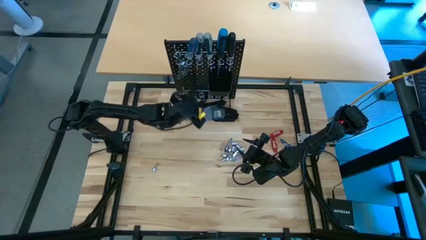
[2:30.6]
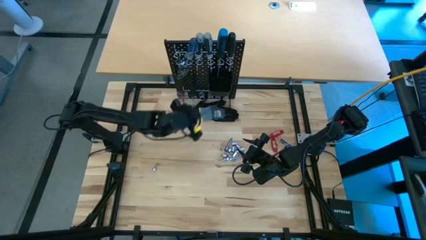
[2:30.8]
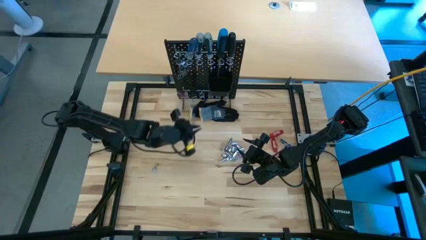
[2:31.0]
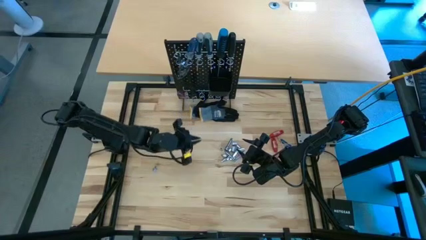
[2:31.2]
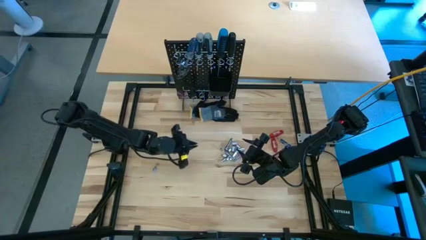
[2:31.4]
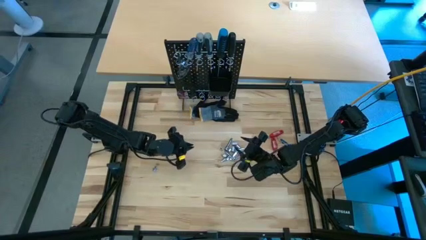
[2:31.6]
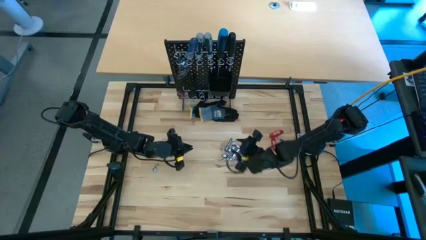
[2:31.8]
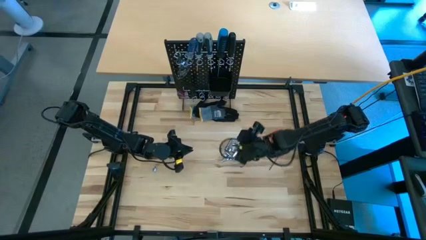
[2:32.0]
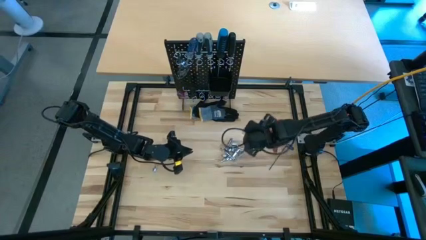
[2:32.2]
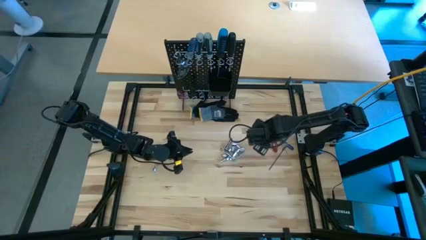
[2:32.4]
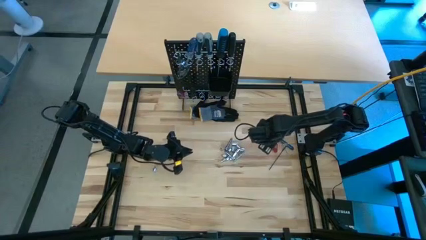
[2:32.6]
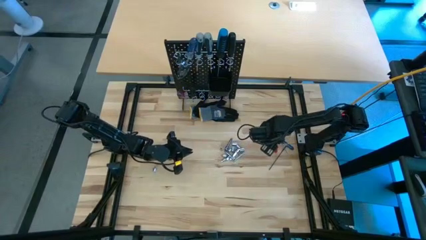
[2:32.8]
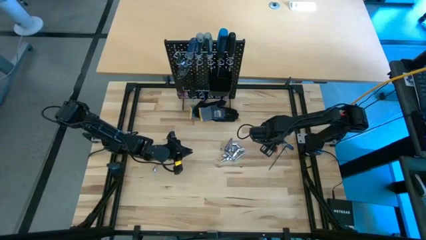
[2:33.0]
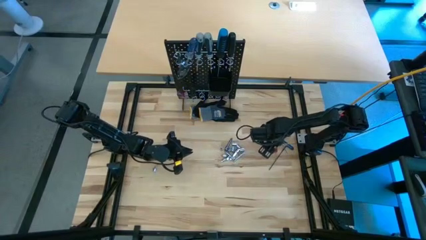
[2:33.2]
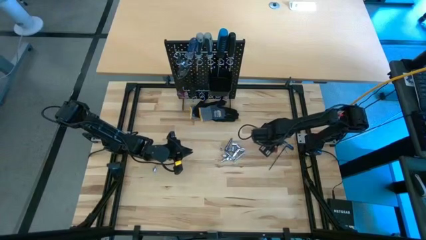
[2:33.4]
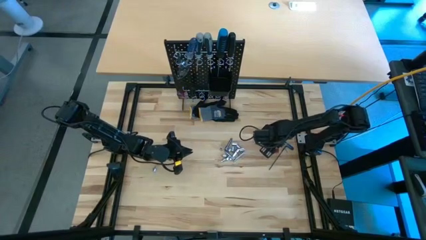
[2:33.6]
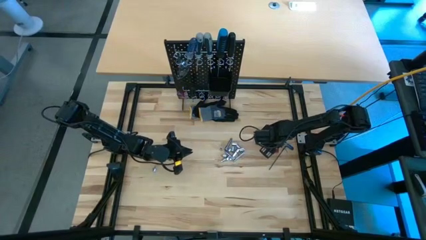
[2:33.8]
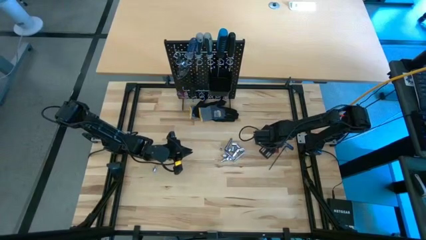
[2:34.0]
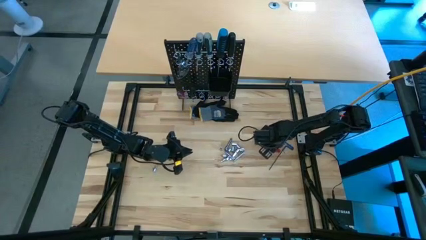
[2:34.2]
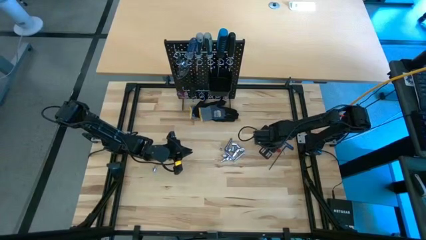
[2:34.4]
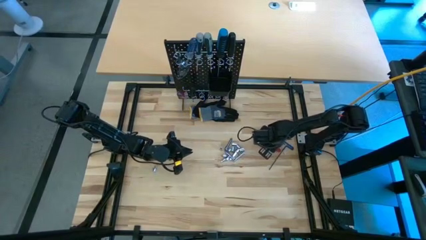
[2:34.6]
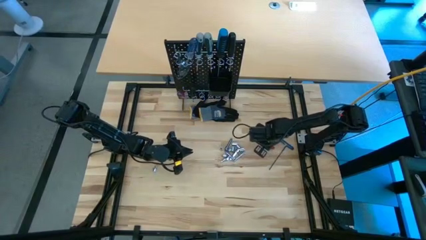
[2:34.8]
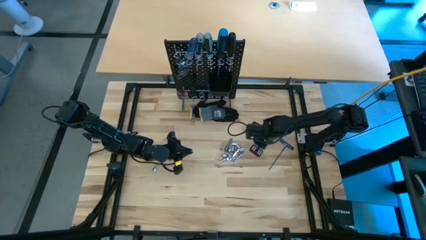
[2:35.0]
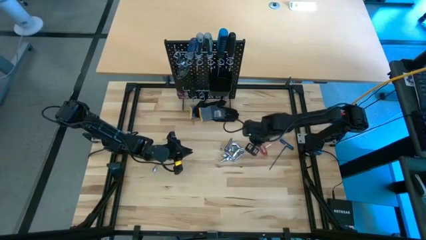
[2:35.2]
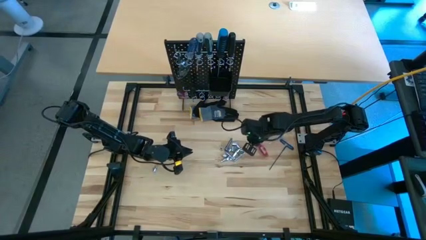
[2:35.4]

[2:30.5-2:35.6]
Task: Hang tools onto peg board
Hang the red allen wrench on the pegboard

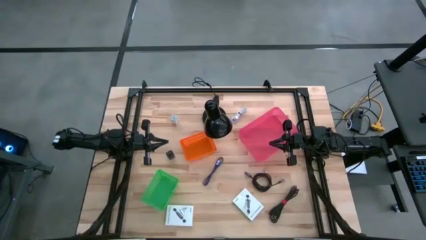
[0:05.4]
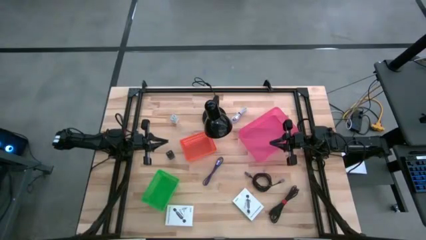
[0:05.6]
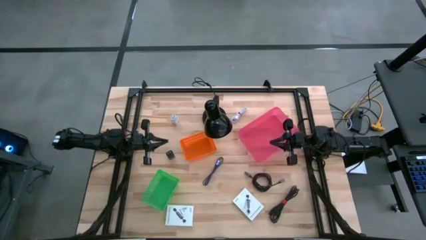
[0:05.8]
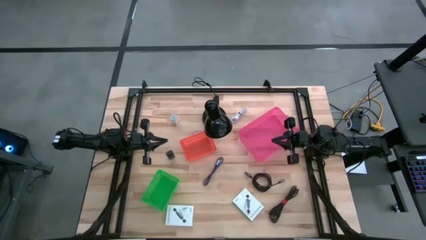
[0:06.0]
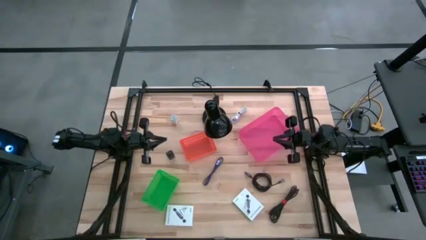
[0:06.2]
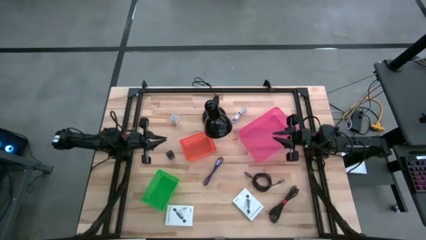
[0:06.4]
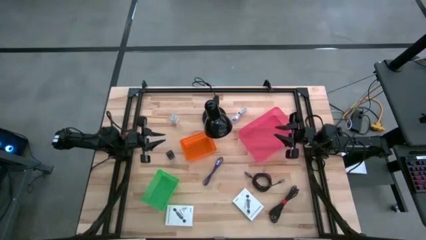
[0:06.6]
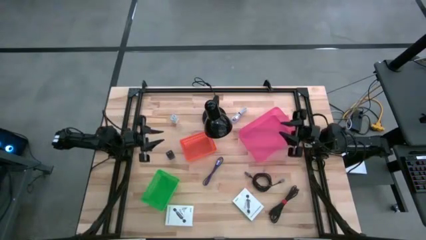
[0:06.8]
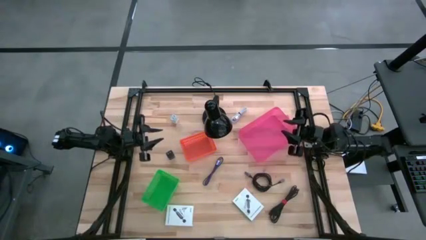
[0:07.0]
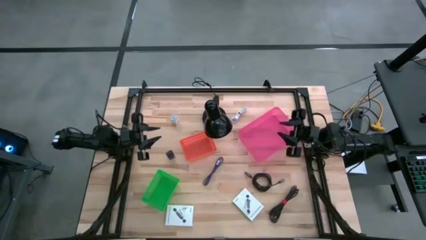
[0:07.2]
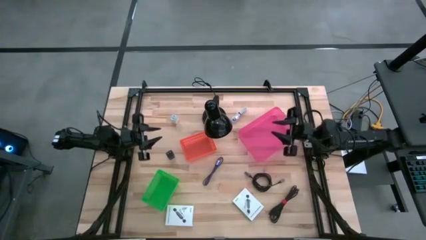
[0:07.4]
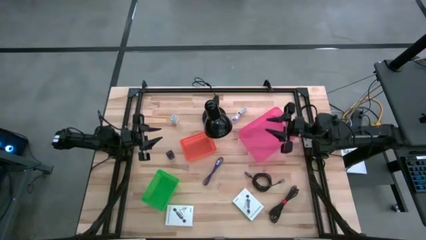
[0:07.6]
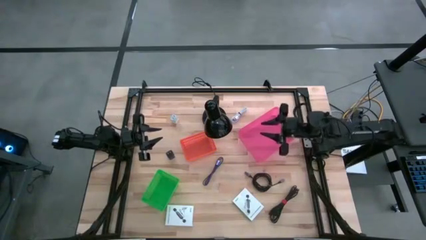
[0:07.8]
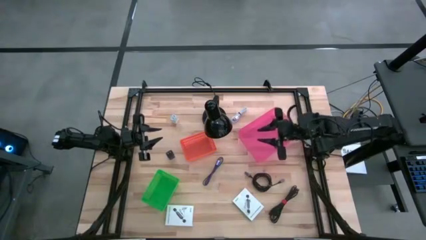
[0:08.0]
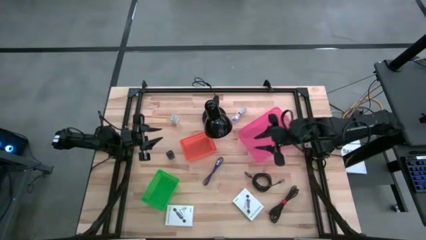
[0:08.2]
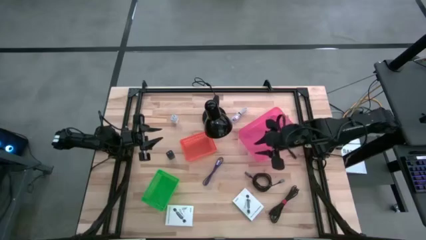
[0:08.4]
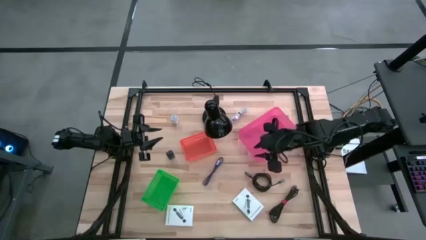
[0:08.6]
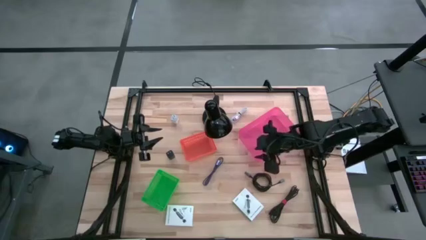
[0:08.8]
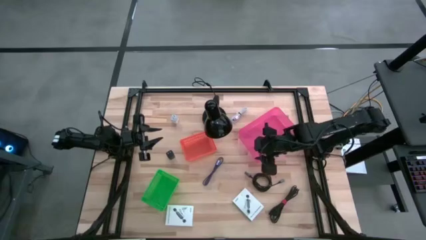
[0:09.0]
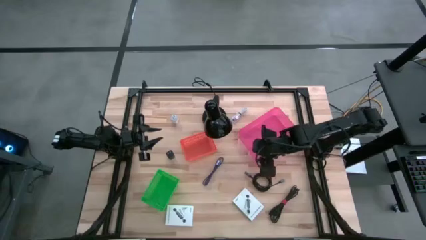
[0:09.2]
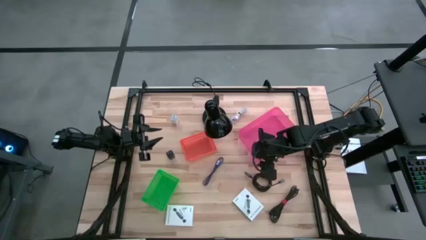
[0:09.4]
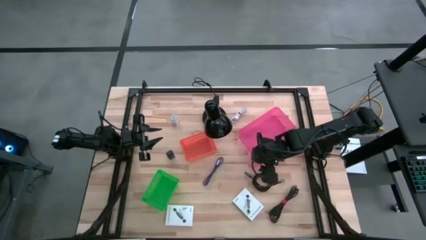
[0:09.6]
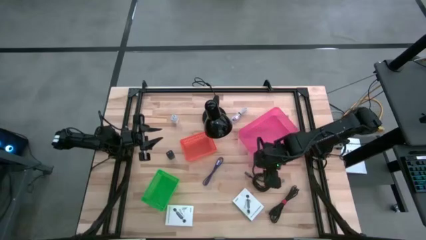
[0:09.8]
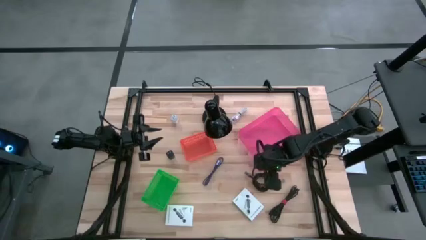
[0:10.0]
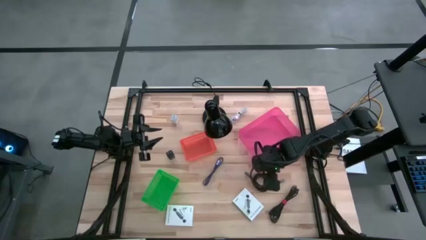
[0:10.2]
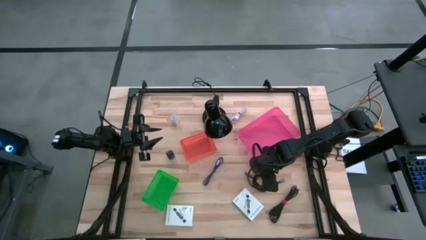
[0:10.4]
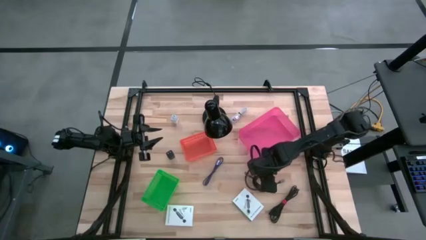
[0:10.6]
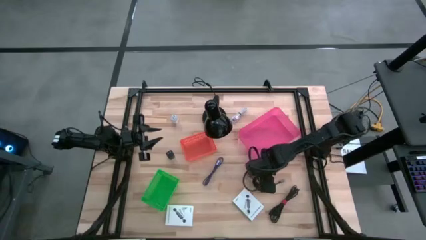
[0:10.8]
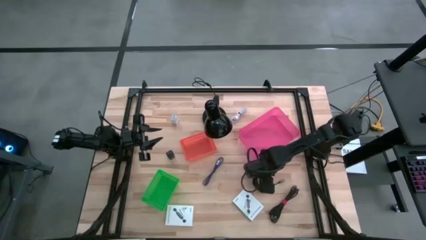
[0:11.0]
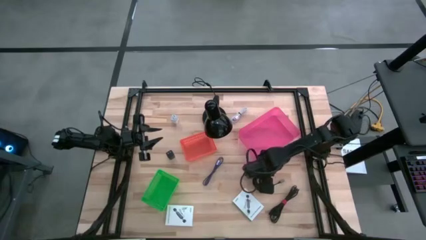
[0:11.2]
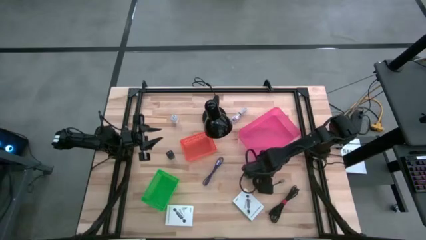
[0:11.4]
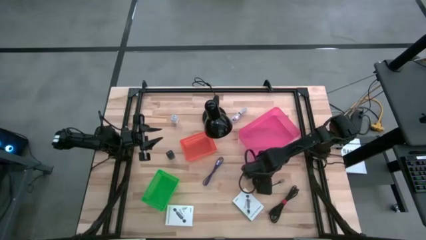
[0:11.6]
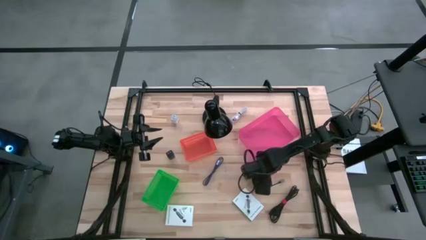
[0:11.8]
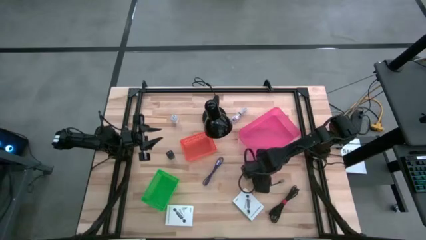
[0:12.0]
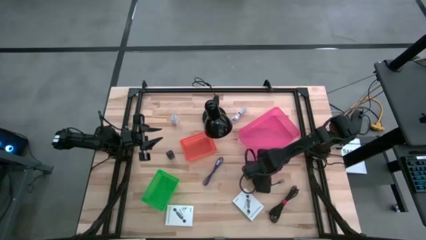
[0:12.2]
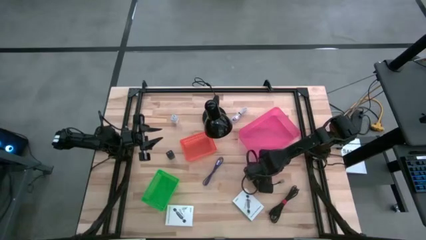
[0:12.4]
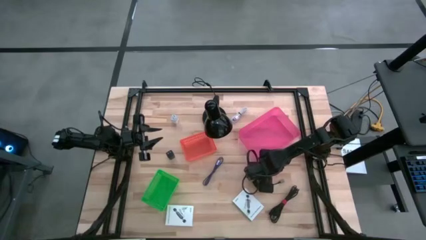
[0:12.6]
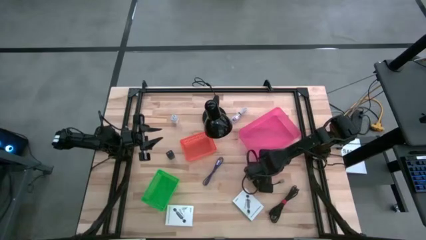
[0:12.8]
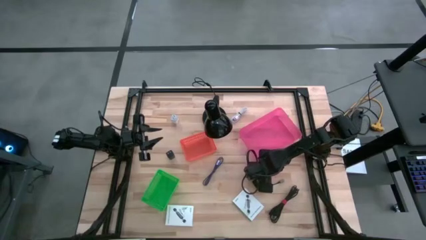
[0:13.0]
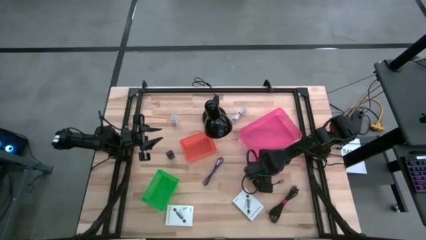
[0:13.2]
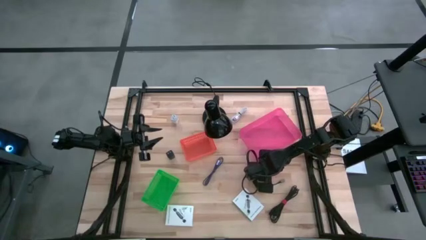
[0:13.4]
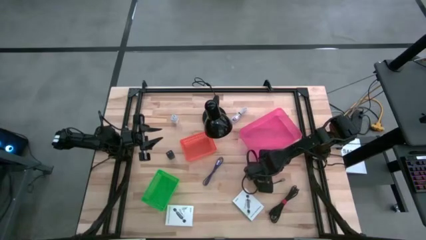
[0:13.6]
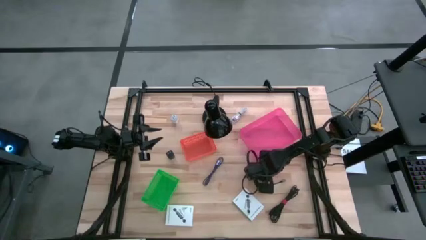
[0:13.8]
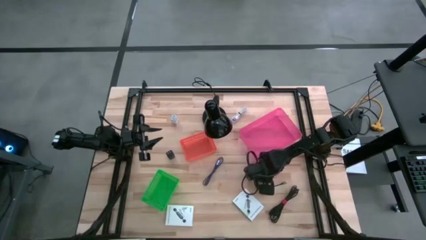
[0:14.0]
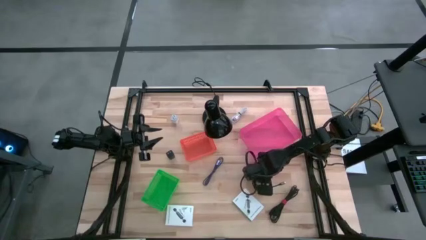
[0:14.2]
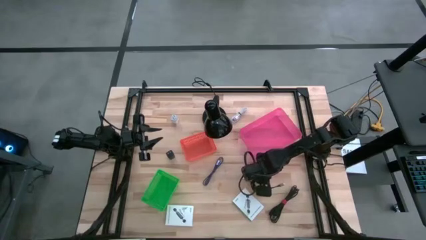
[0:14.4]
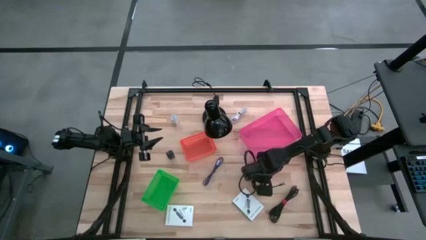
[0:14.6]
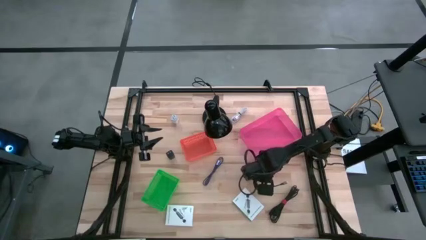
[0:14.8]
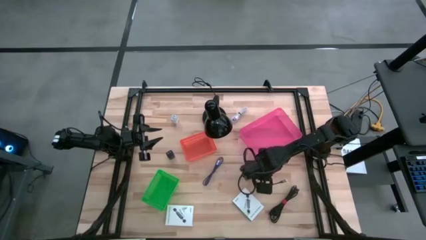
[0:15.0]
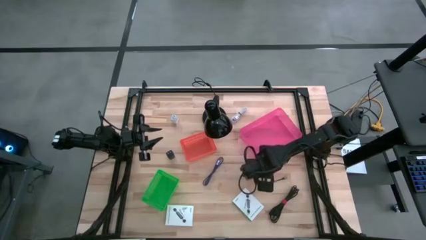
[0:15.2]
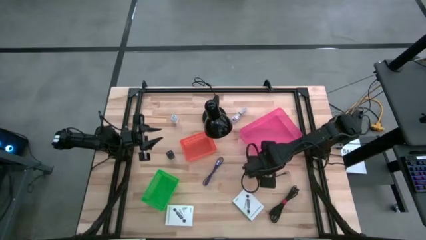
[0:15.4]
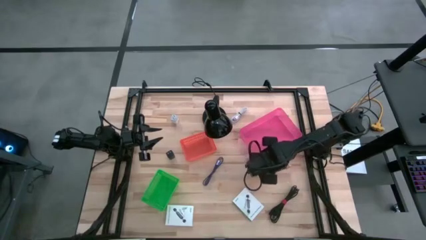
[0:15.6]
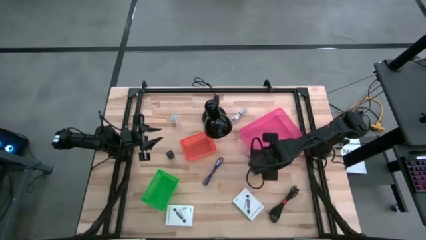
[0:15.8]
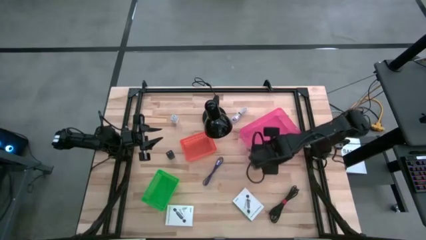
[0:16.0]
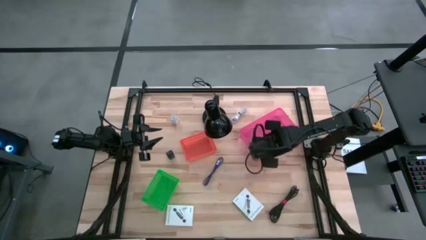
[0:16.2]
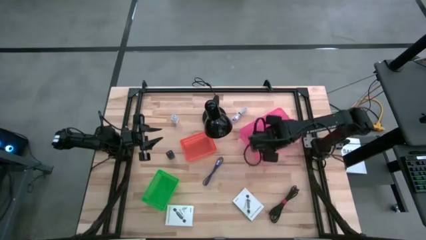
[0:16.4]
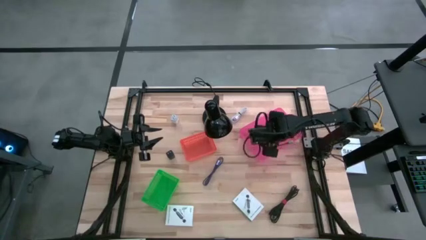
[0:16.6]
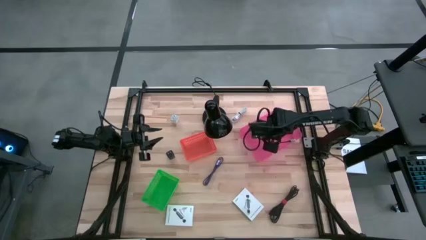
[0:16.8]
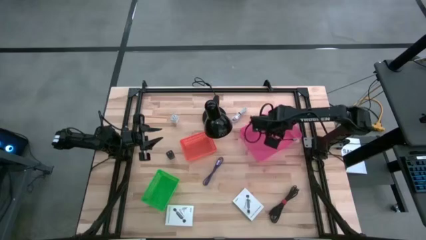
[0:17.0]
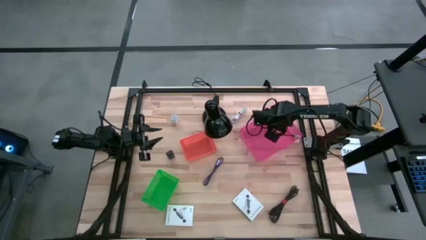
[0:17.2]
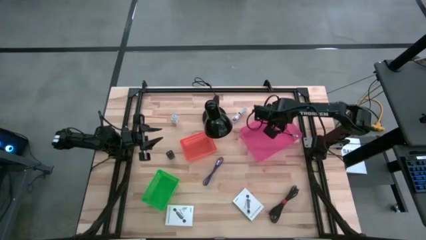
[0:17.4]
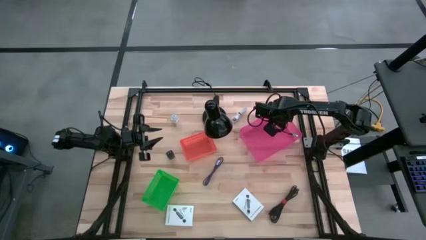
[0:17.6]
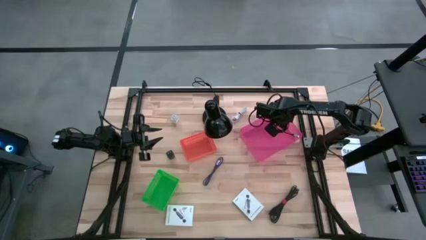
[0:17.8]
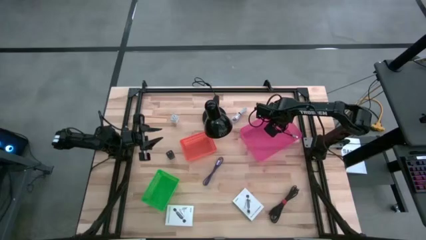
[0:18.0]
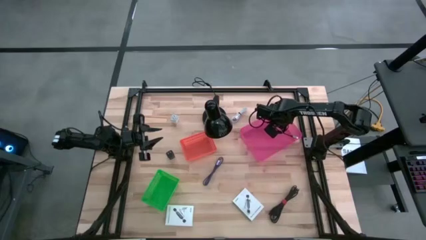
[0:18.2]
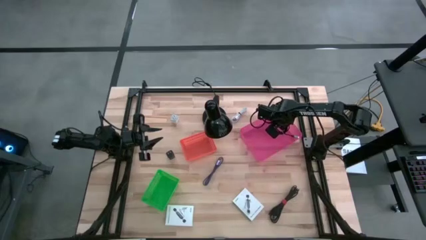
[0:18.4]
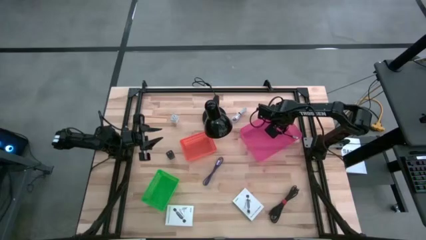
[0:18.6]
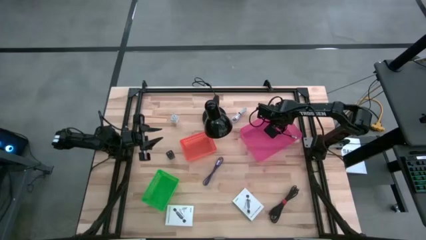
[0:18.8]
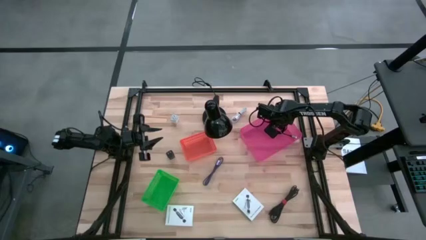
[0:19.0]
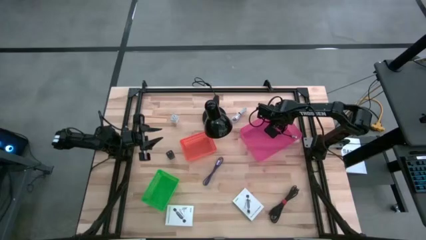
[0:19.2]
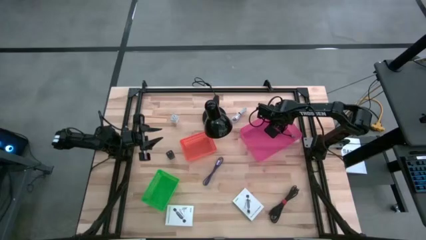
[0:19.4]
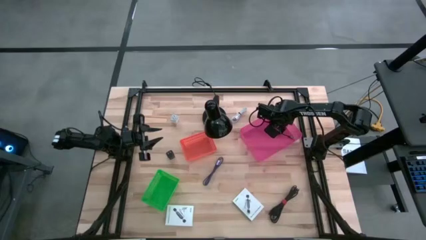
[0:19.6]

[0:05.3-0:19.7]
Task: Pick and place items into bin
Put the top black charger cable into the pink bin
